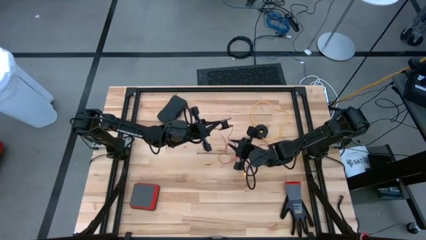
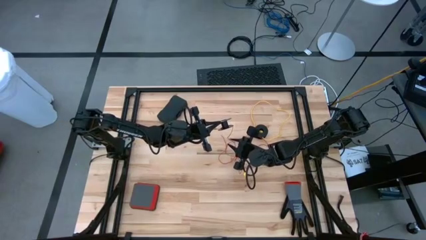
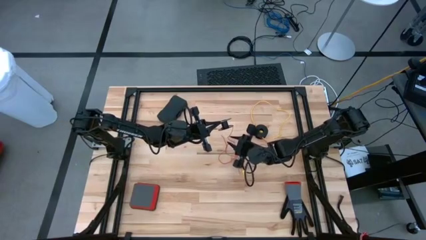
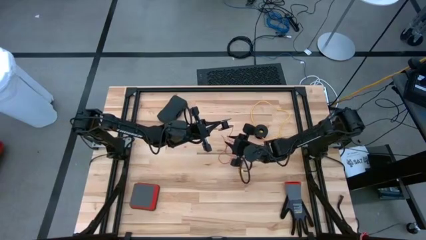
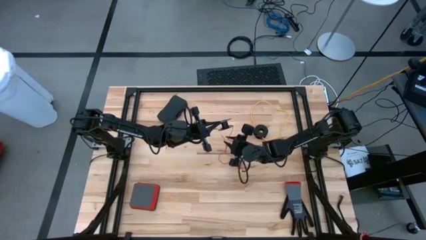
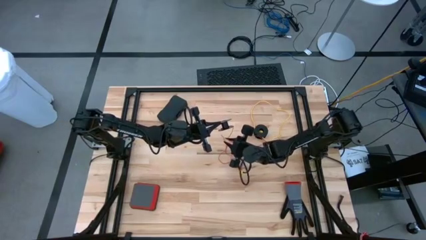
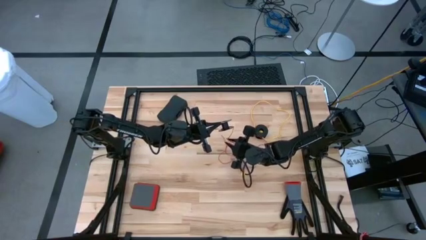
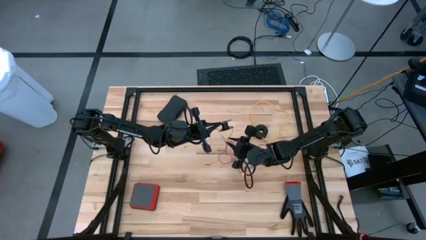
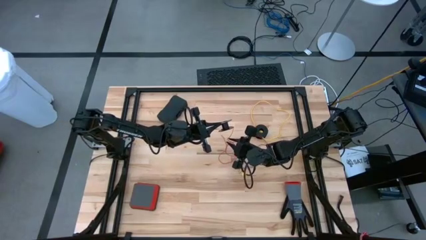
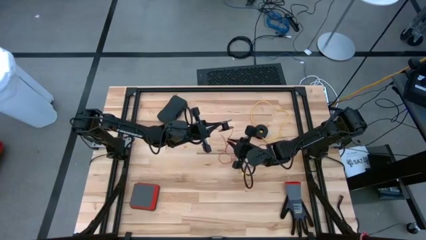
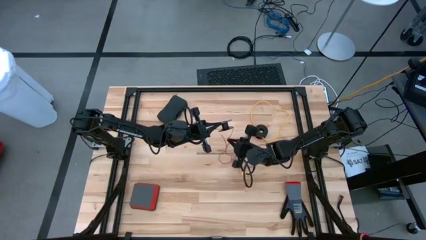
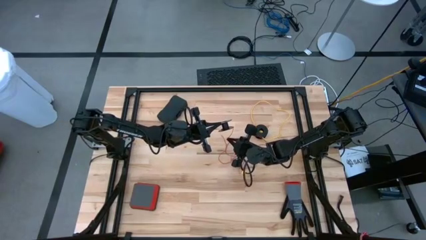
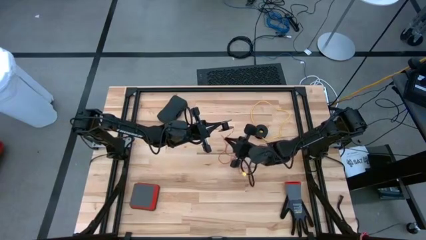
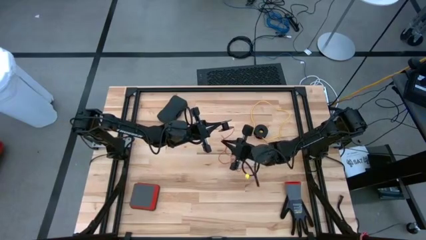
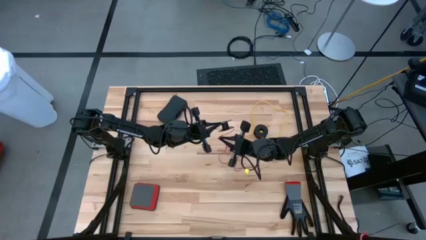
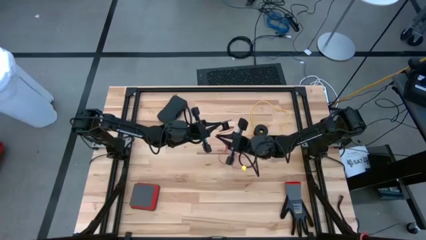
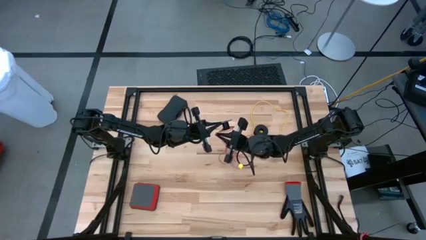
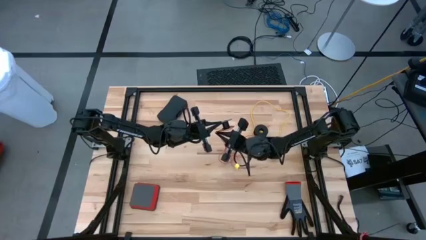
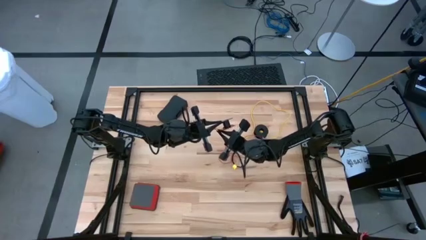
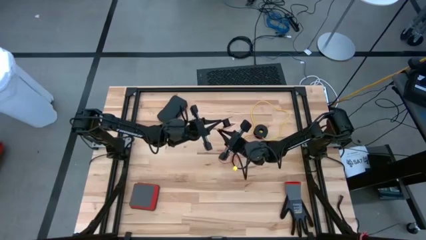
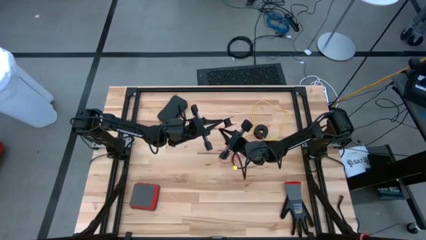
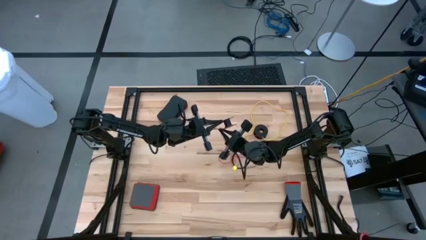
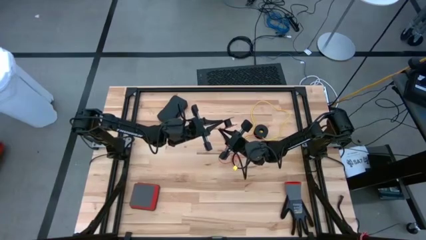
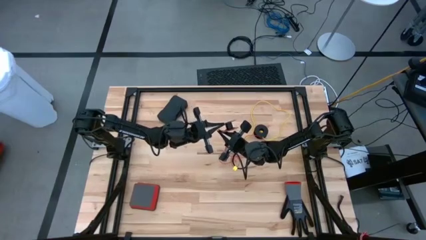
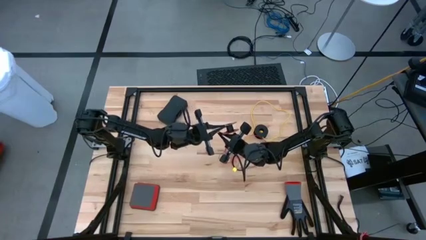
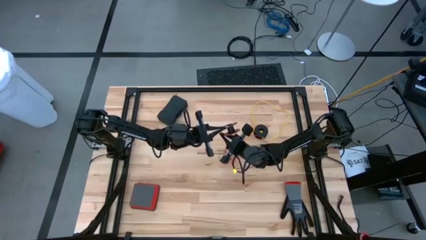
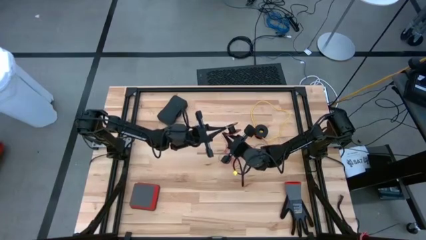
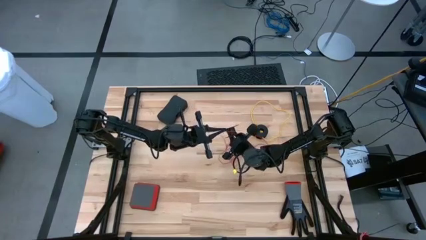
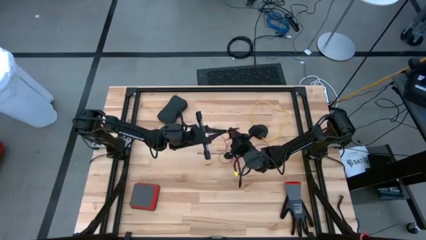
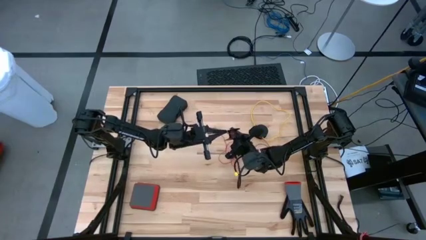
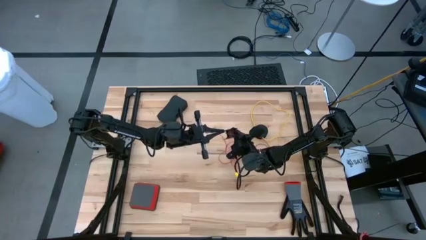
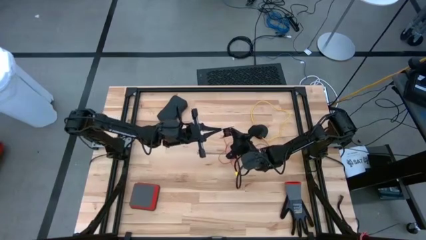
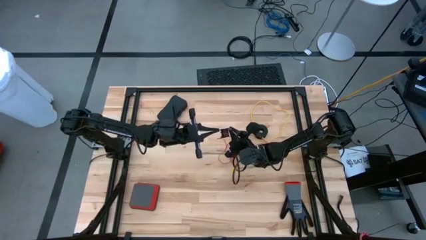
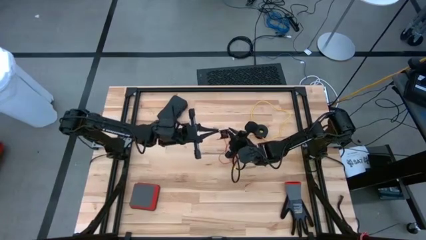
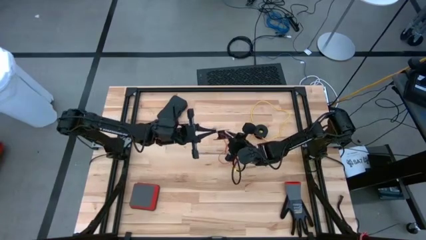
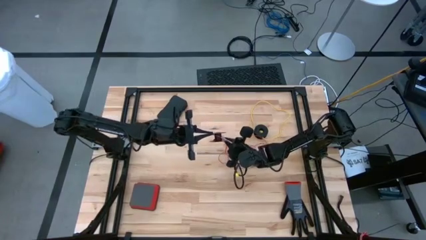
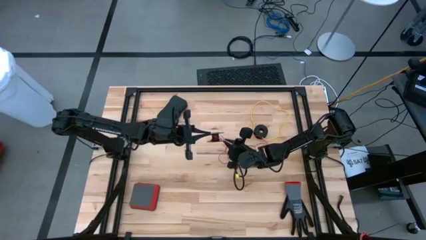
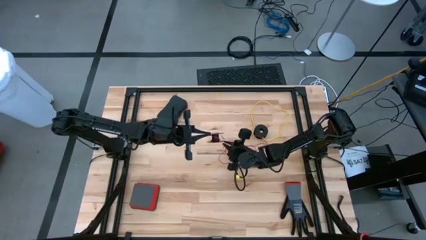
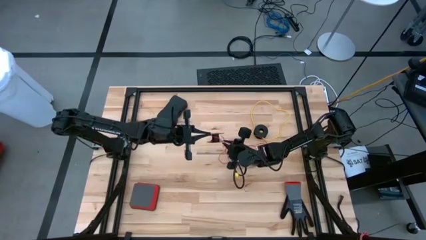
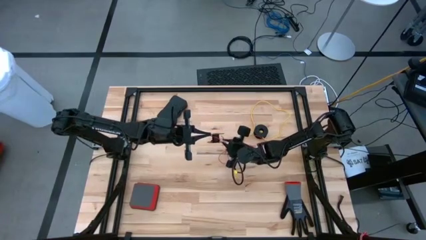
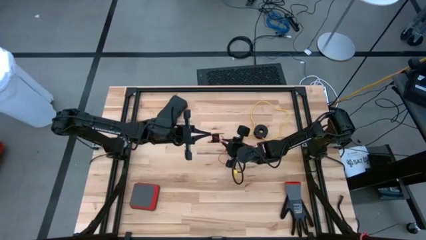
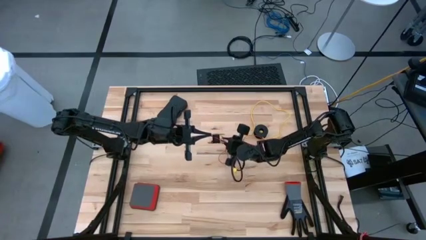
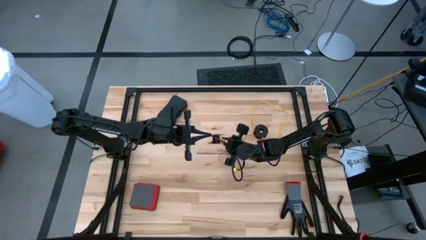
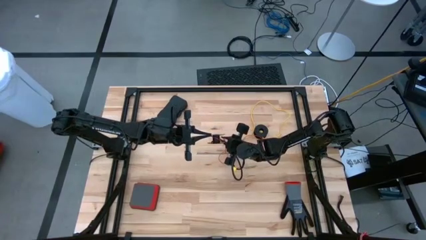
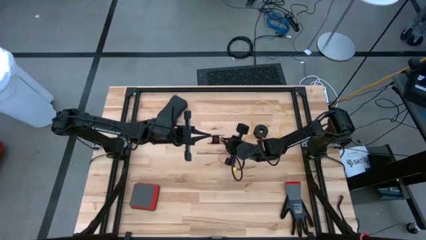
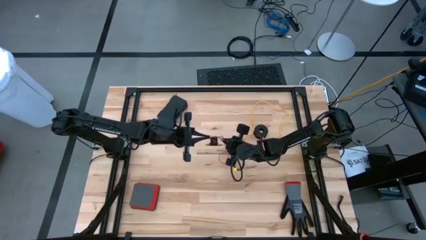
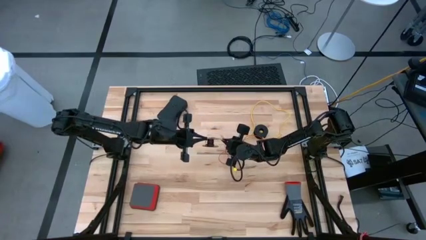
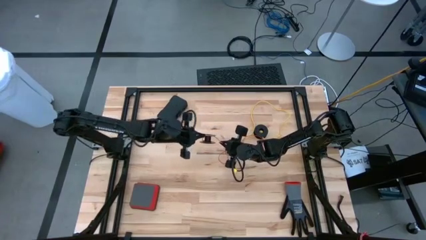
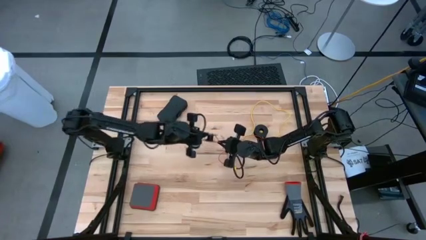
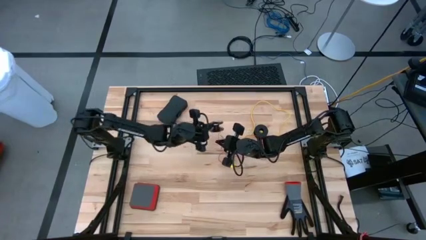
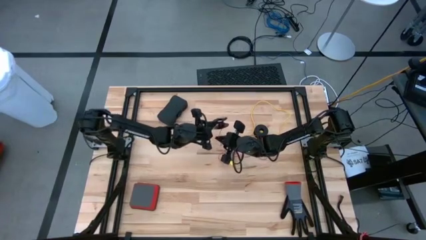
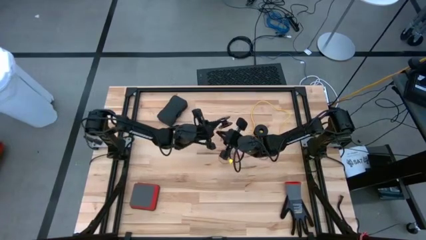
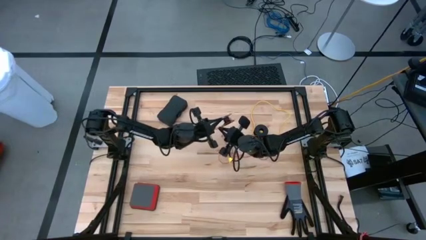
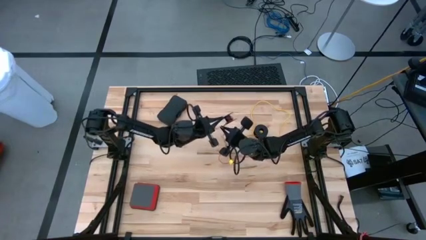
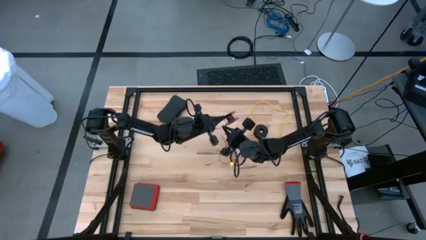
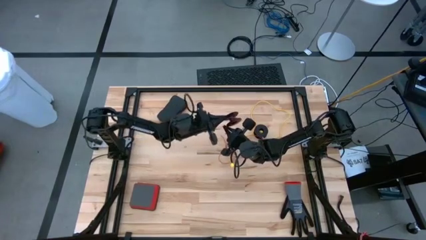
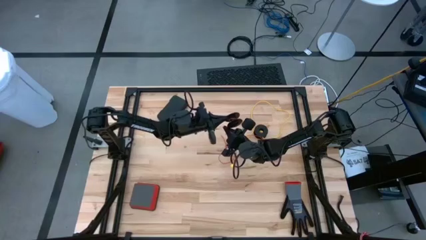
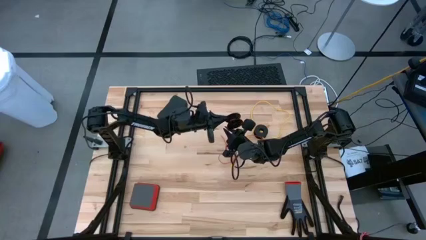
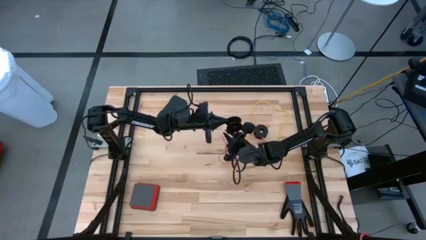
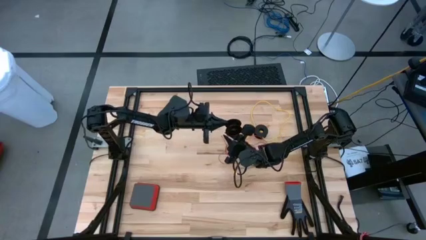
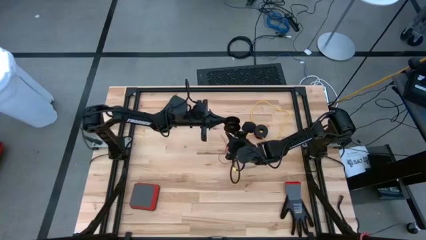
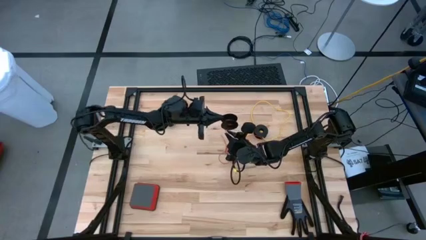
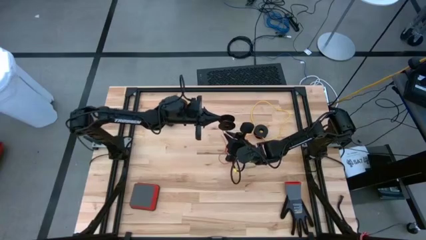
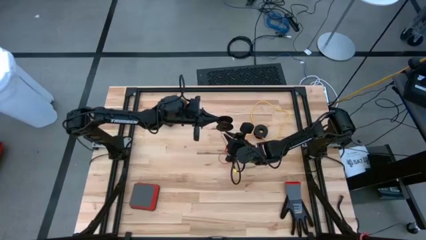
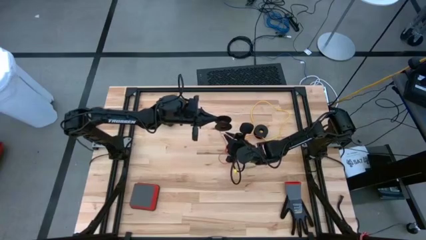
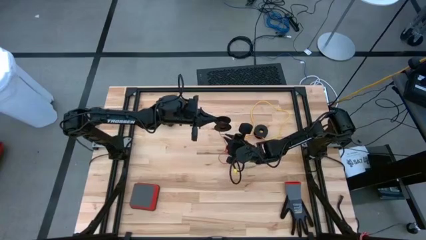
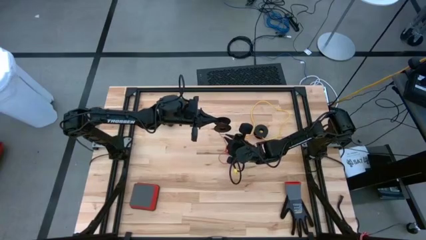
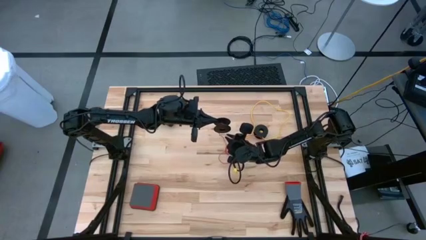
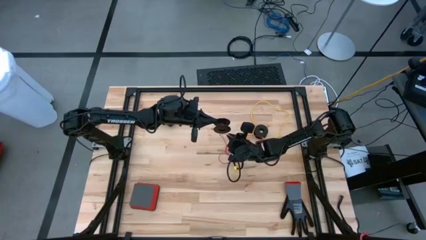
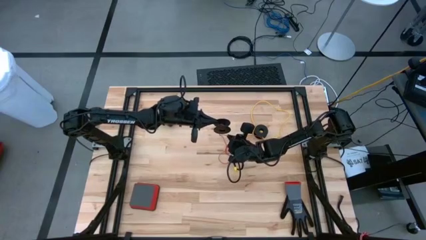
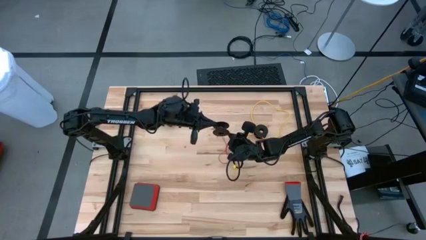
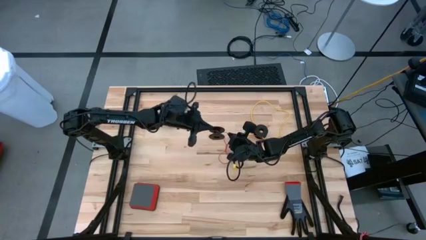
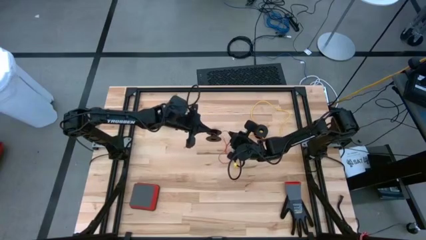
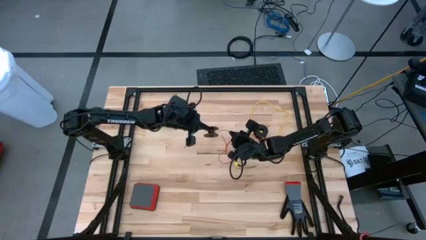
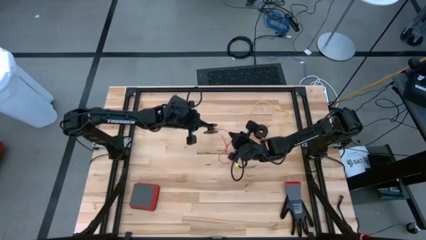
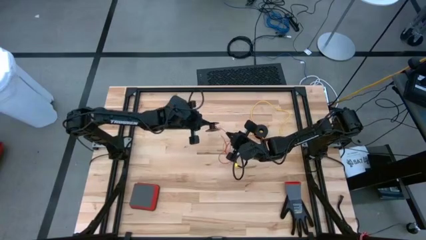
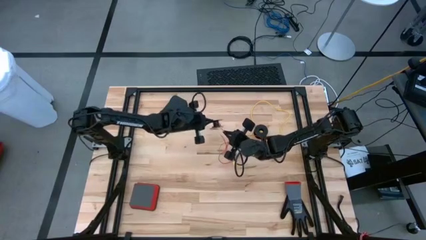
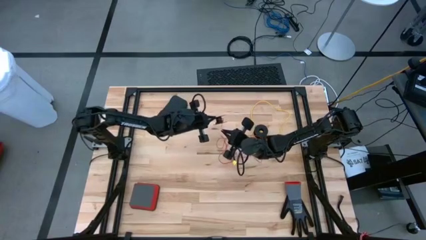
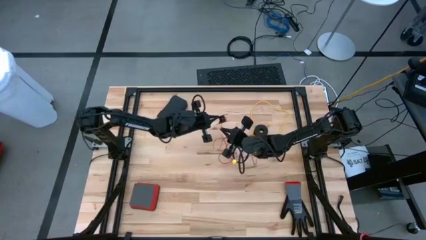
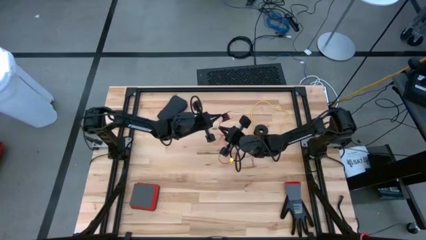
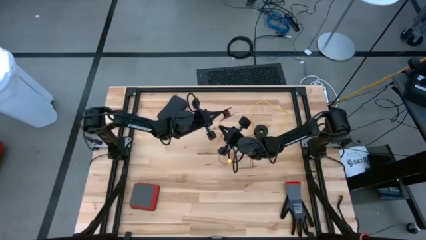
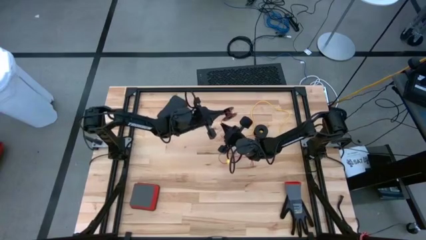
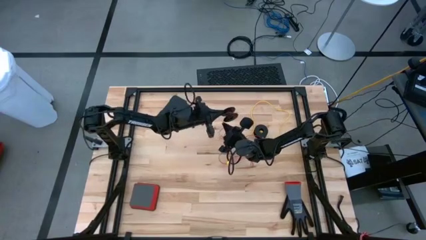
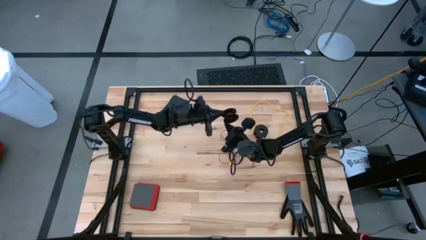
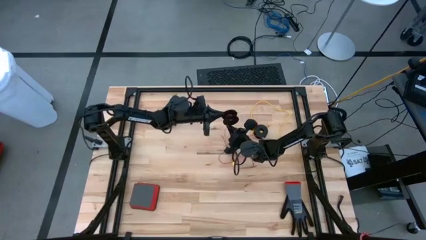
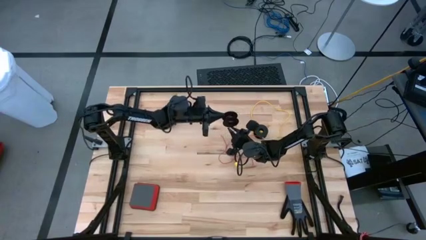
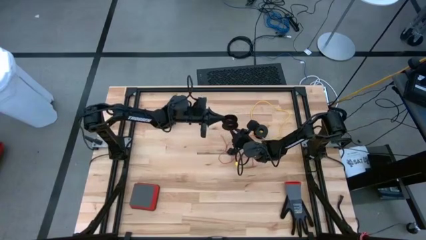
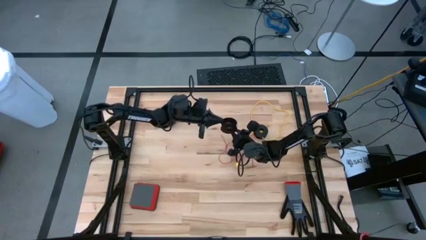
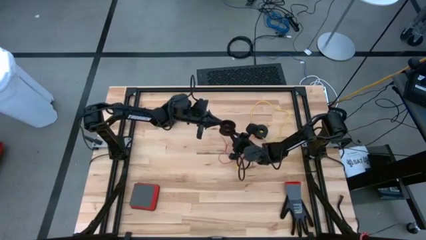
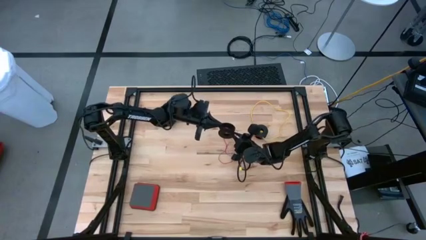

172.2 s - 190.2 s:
Task: Coil cords
Coil the red wire onto the black spool
